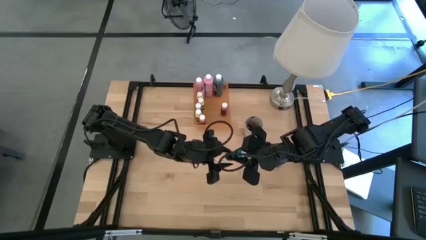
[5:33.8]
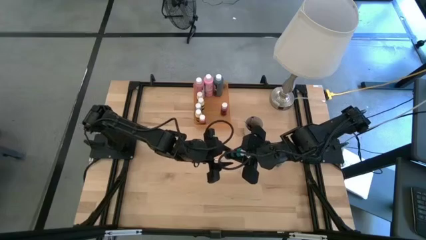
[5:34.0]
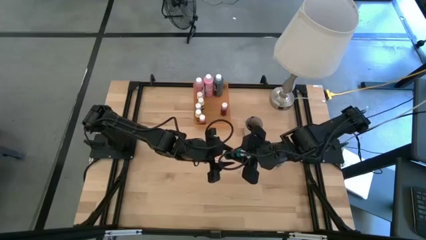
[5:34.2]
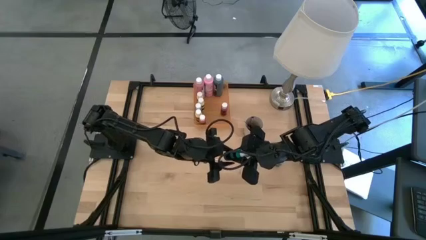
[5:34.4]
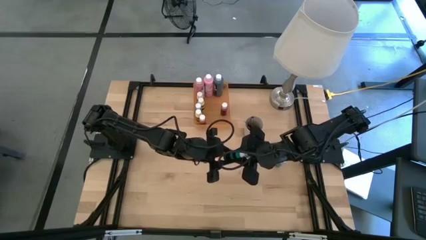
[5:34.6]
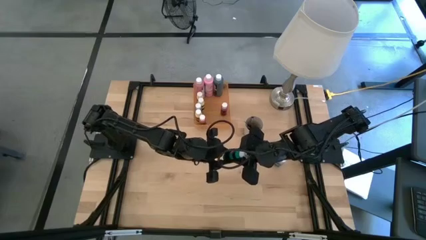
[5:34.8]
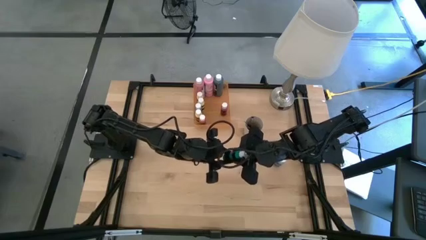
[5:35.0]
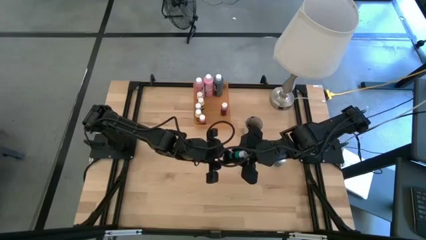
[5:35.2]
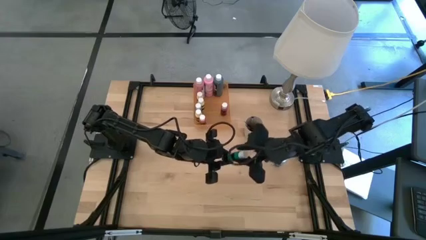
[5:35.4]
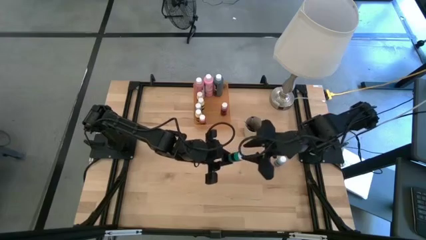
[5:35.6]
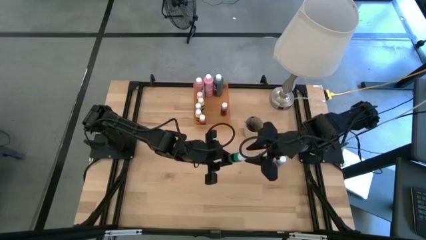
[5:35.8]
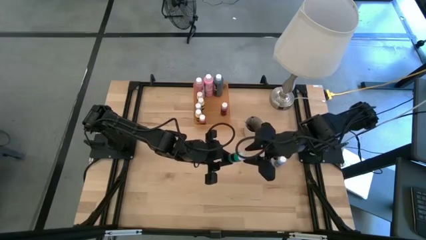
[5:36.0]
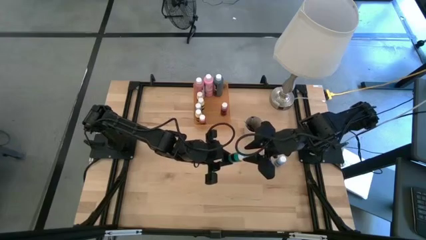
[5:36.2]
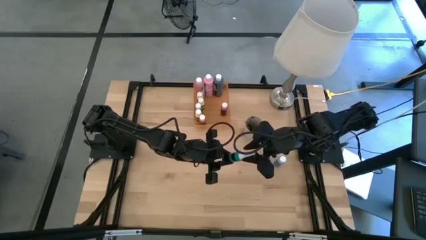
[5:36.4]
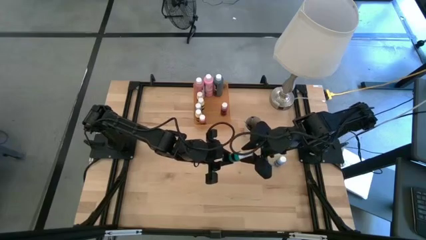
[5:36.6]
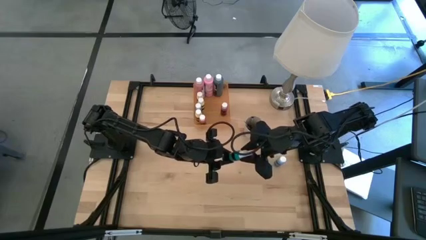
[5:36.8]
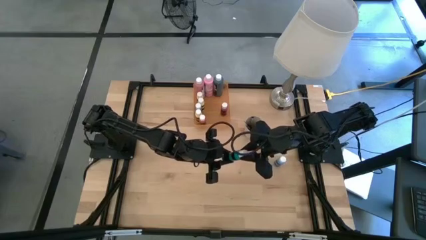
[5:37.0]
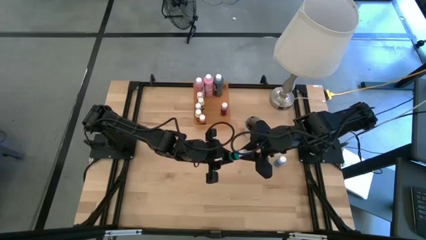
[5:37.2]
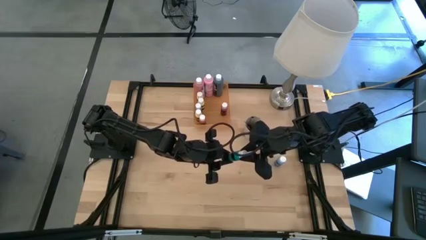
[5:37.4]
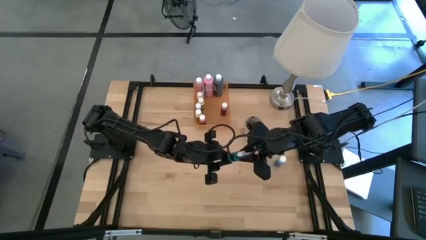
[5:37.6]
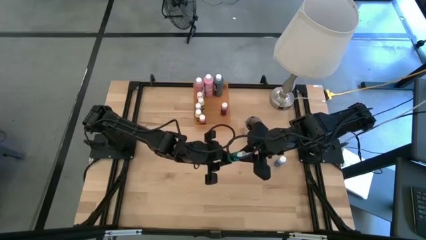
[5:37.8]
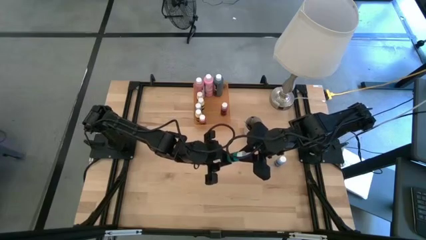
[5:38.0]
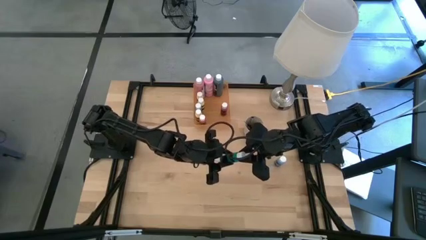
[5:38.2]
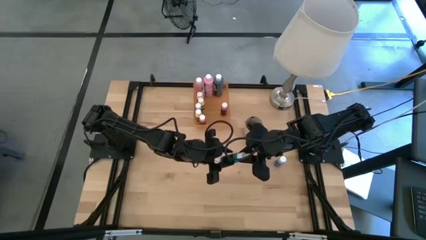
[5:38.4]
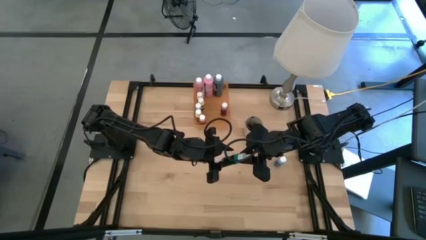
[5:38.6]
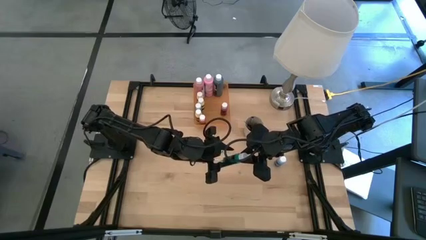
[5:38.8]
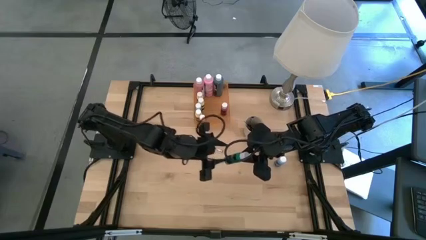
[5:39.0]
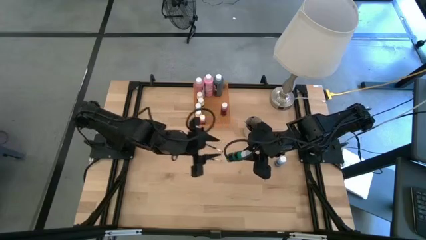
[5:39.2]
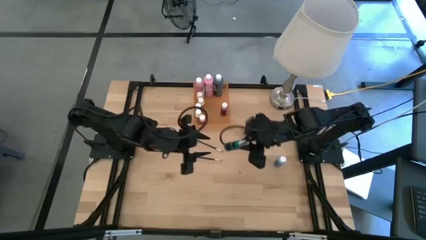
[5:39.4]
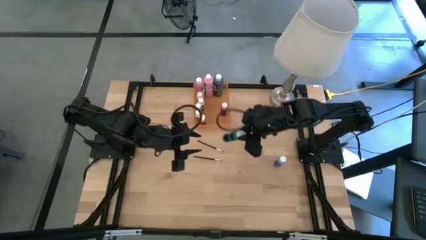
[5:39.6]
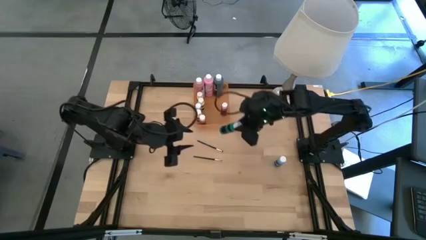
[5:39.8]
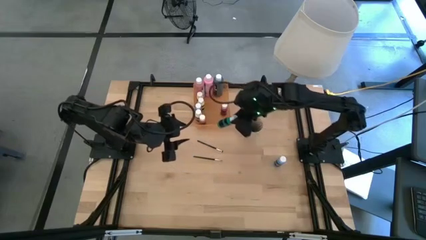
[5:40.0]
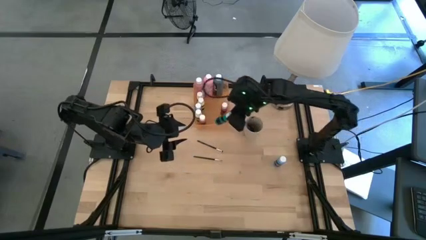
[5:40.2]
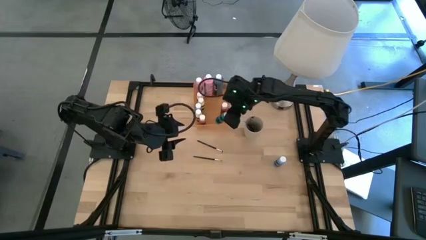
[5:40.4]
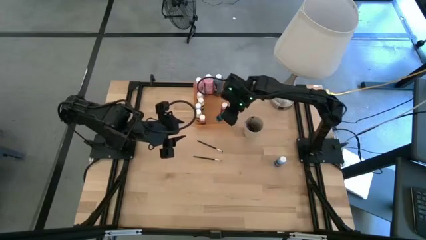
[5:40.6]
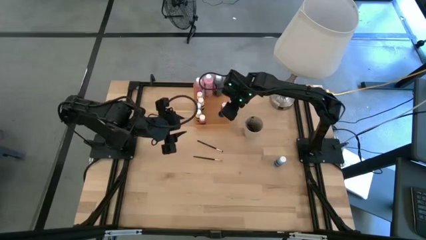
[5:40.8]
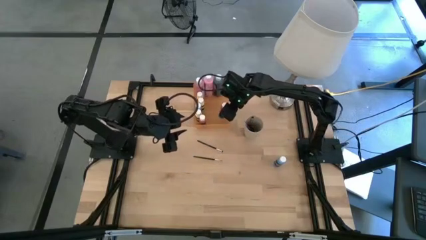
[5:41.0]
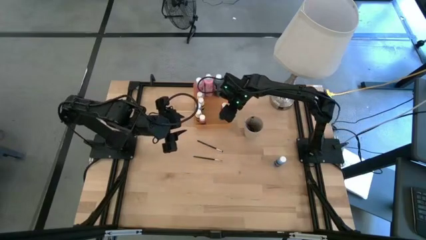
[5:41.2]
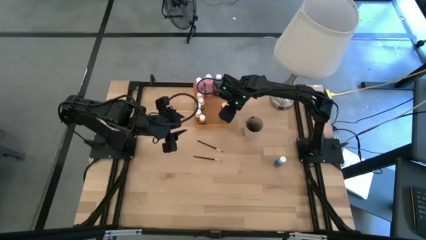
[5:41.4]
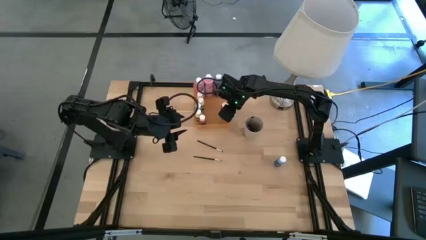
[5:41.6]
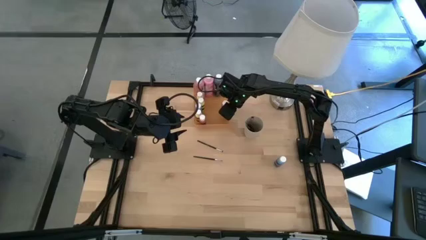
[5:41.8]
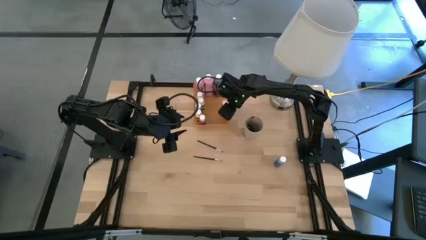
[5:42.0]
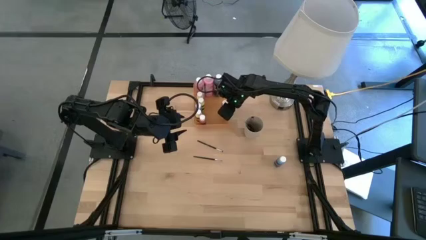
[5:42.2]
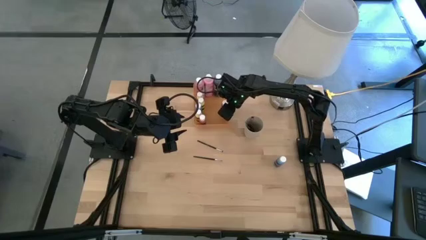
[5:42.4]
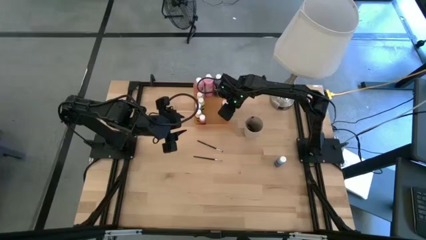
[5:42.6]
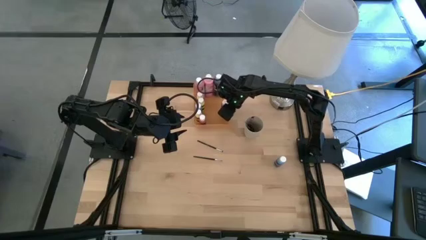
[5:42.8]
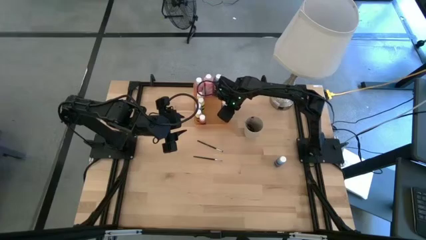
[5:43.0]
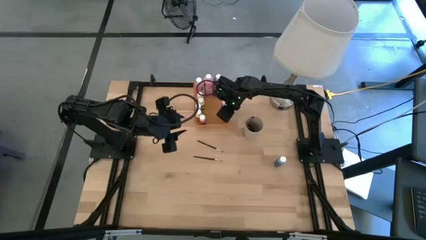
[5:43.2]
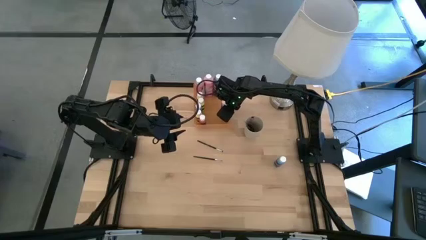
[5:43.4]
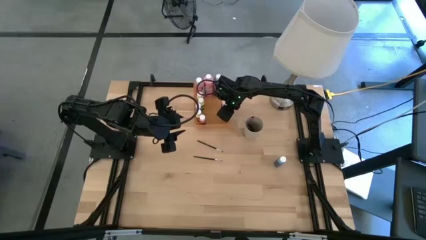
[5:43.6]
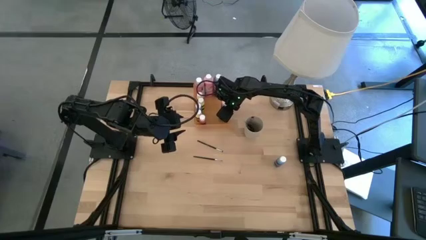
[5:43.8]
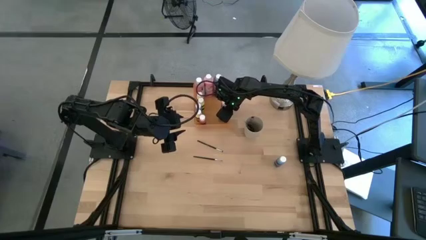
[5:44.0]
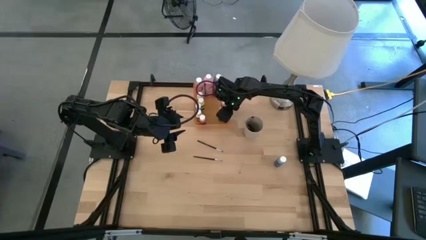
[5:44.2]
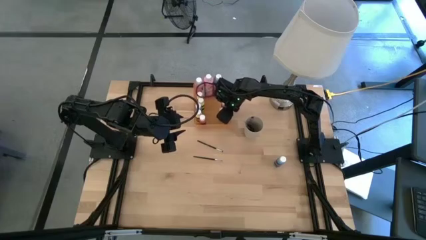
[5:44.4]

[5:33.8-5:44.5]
Task: Pick & Place Paint Supplies
Put the green paint bottle into the orange bin

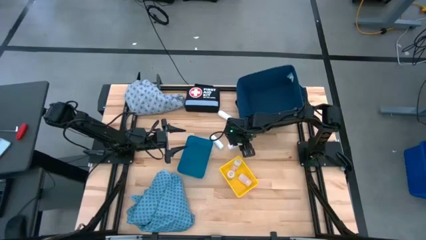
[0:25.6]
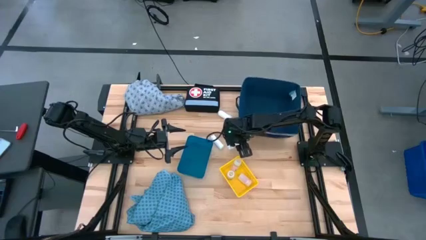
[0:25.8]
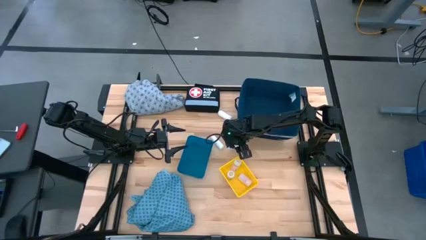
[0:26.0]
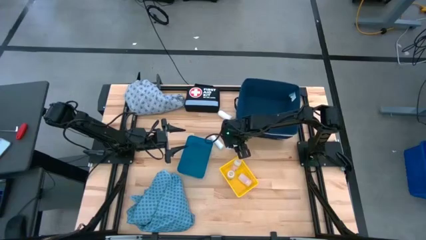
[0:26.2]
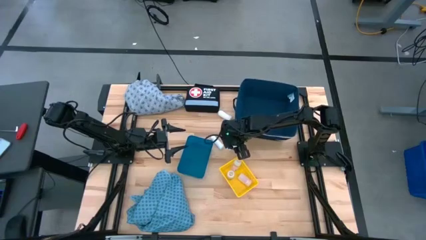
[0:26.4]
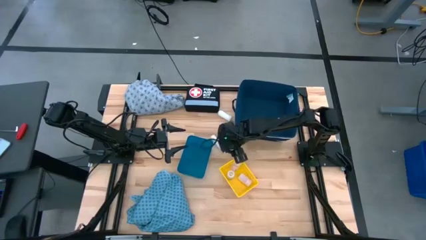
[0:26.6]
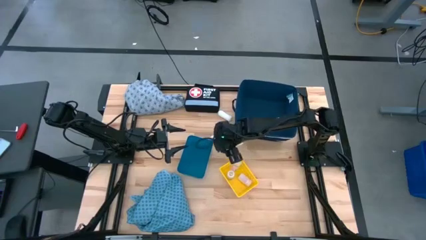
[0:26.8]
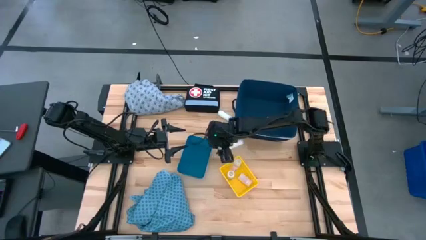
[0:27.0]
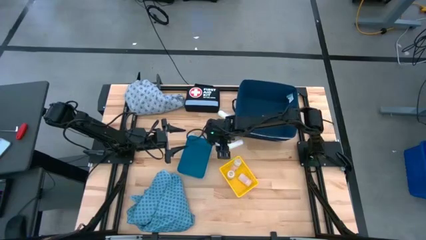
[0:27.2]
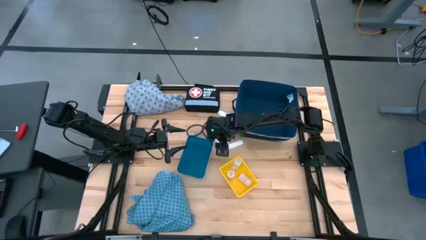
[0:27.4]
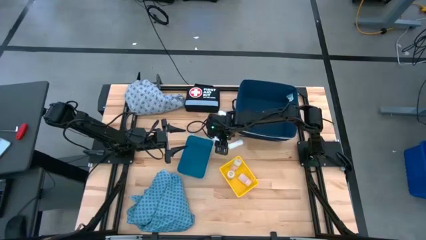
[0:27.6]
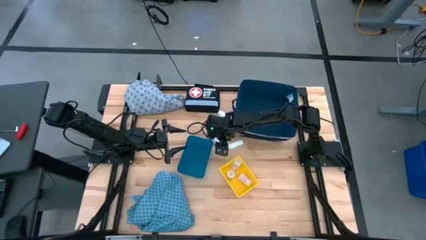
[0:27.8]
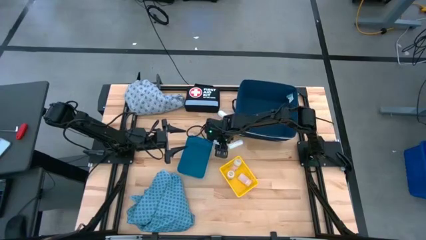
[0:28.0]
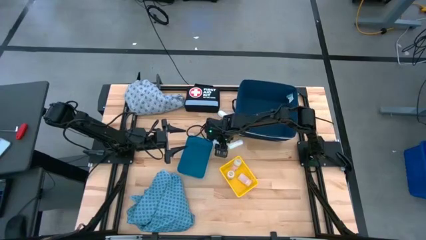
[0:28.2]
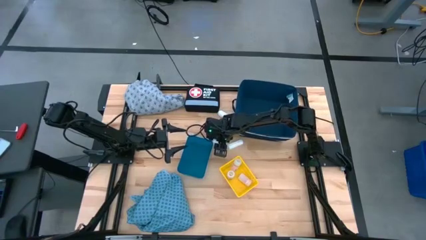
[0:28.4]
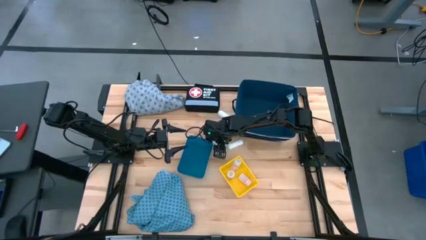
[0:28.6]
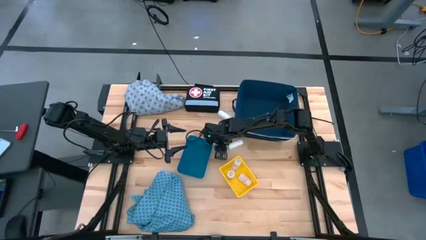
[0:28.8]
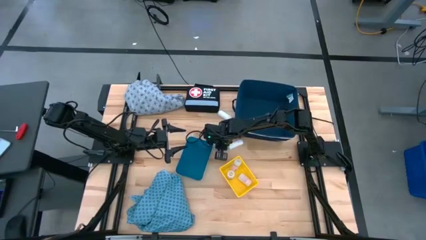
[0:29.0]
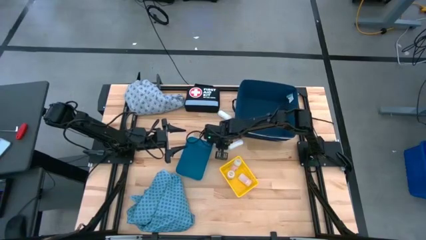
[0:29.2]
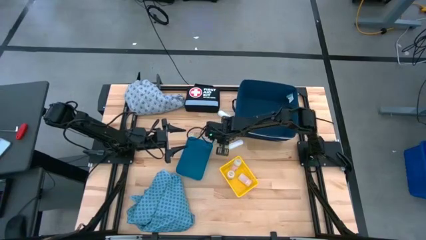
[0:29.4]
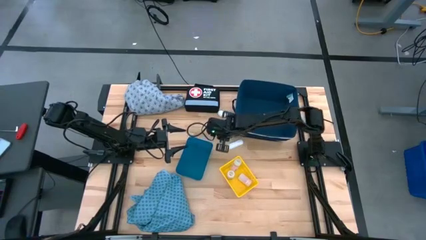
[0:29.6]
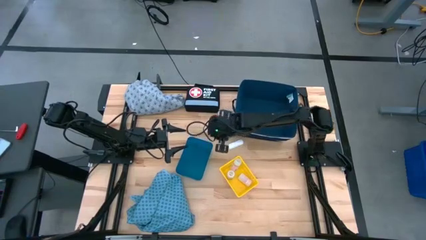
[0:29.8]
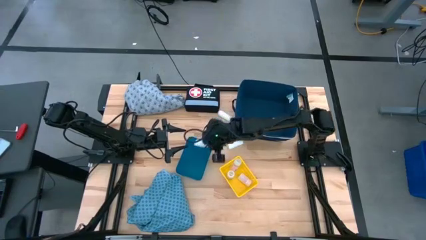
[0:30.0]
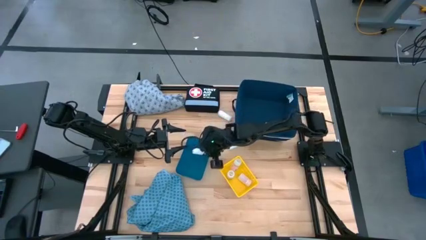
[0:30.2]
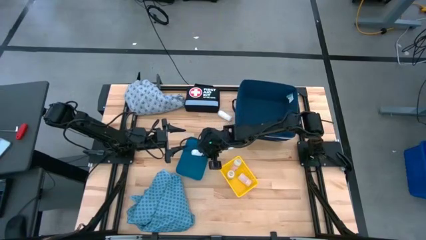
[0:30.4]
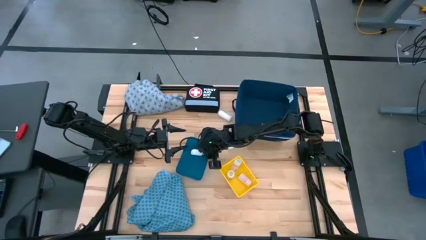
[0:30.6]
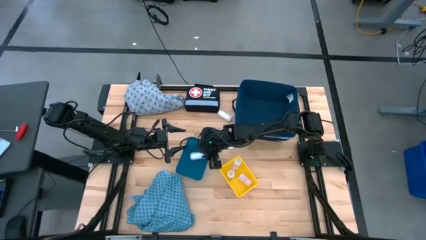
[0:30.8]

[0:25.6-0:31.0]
Task: Pick & place medical supplies in basket/bin
Put the bottom left rolled gauze into the blue bin
